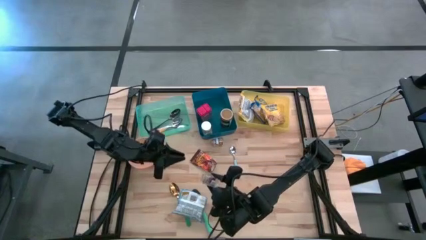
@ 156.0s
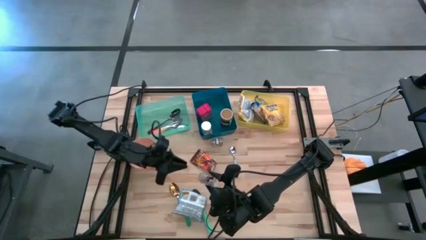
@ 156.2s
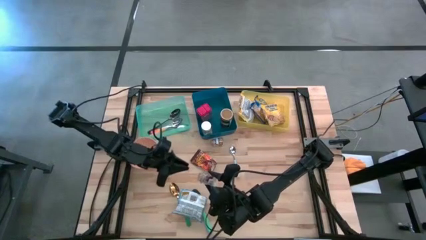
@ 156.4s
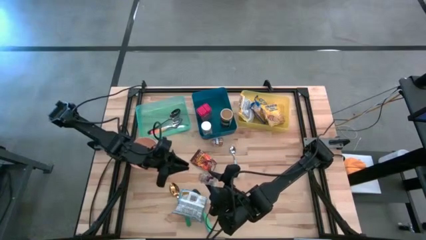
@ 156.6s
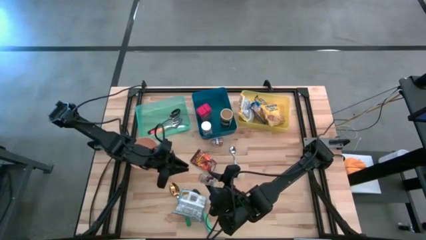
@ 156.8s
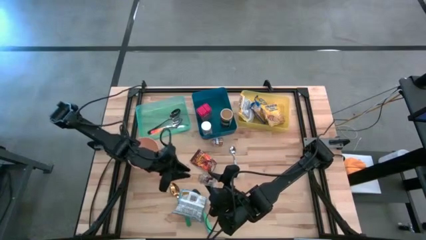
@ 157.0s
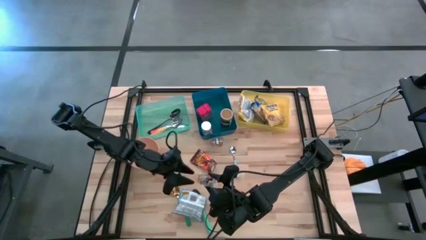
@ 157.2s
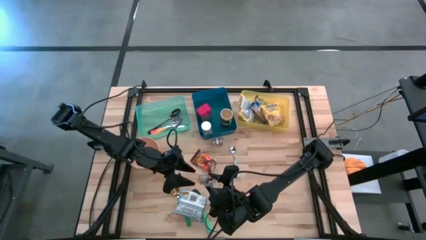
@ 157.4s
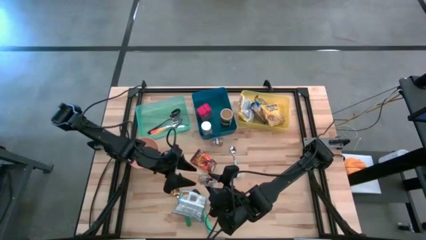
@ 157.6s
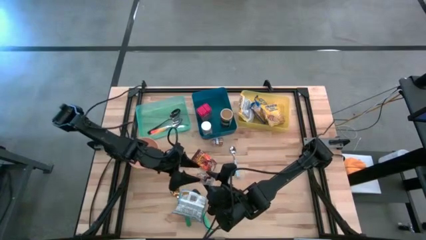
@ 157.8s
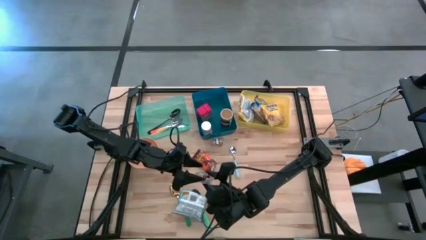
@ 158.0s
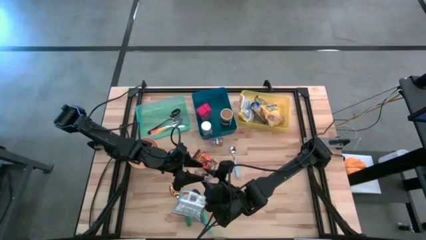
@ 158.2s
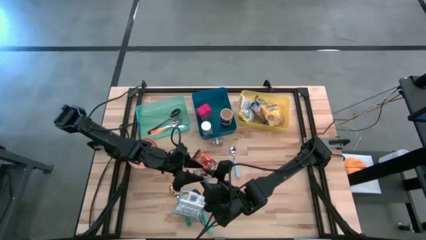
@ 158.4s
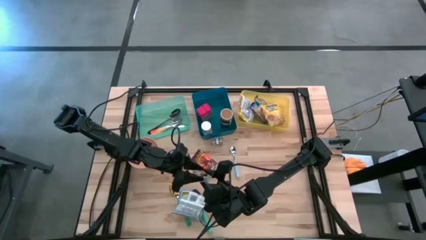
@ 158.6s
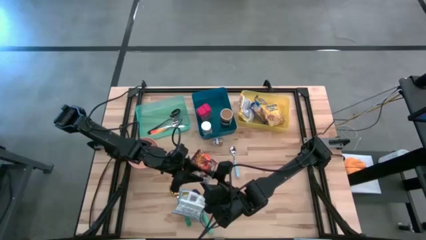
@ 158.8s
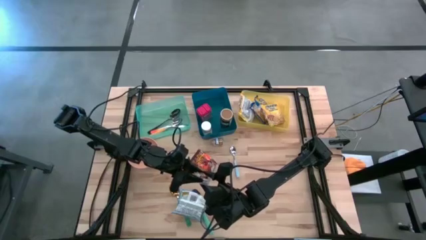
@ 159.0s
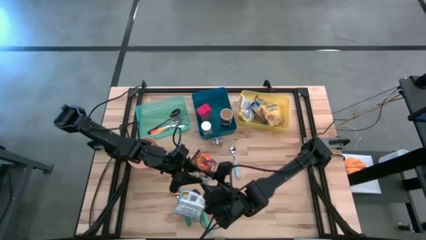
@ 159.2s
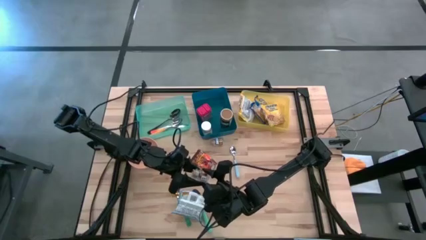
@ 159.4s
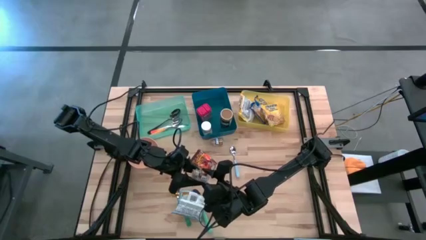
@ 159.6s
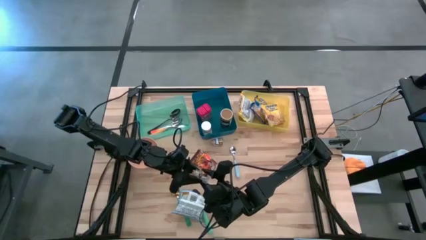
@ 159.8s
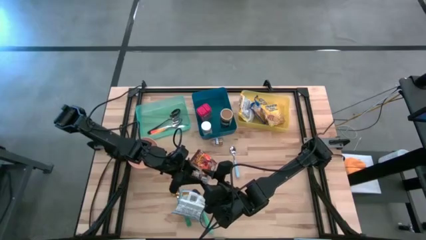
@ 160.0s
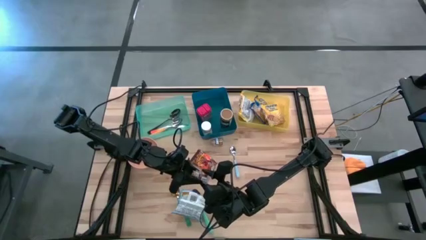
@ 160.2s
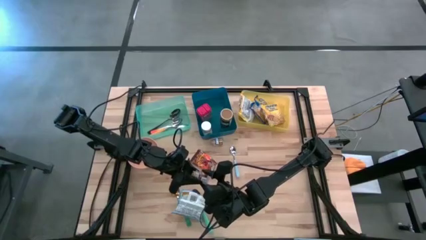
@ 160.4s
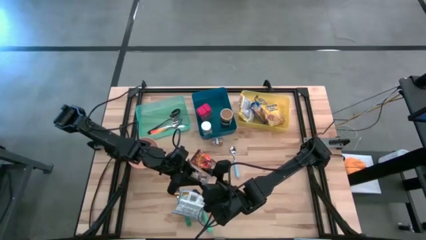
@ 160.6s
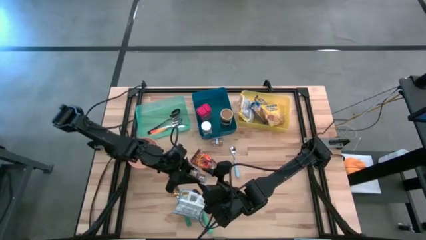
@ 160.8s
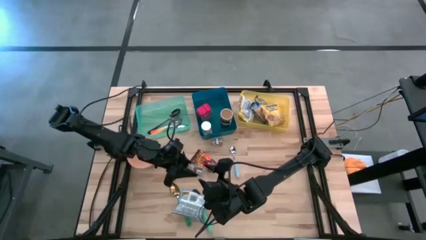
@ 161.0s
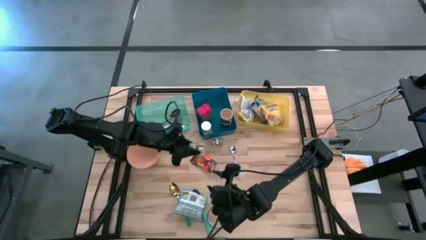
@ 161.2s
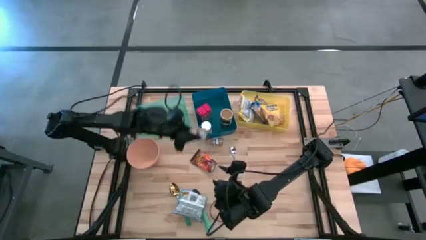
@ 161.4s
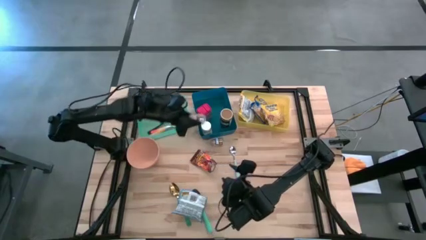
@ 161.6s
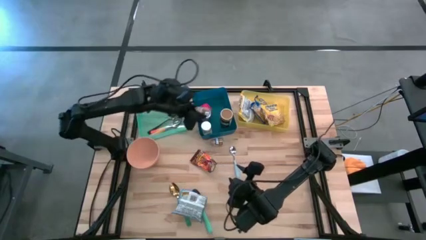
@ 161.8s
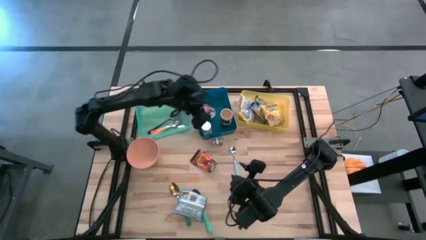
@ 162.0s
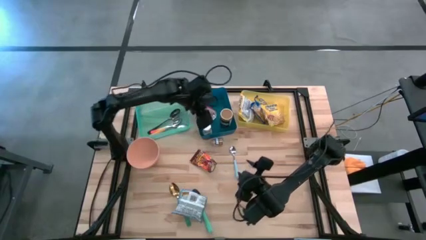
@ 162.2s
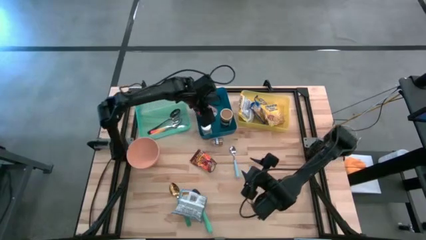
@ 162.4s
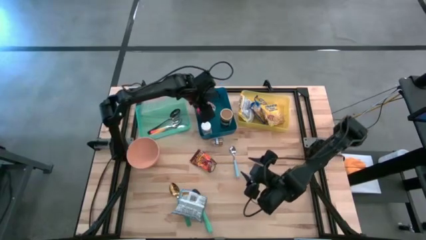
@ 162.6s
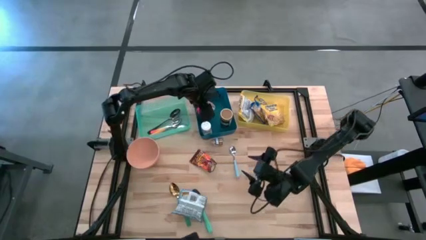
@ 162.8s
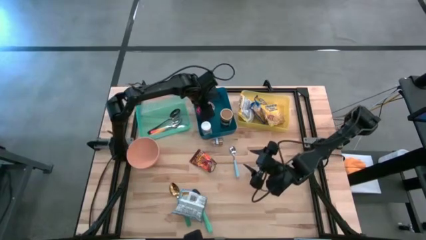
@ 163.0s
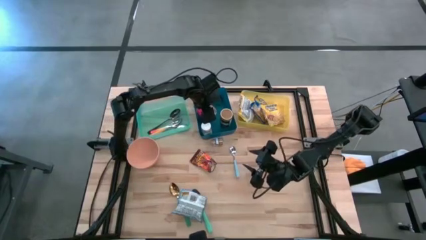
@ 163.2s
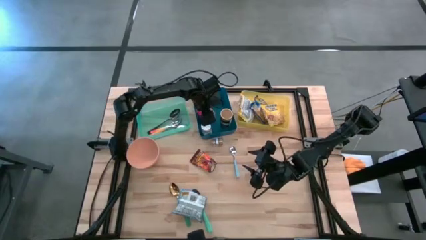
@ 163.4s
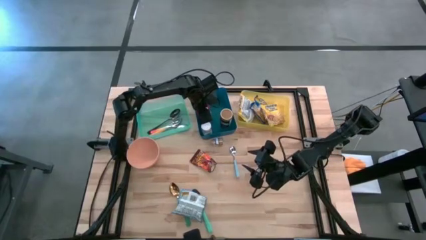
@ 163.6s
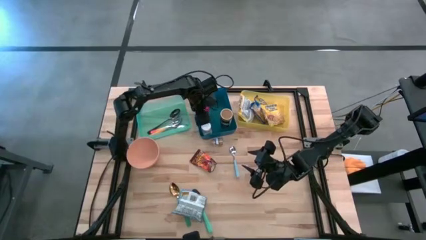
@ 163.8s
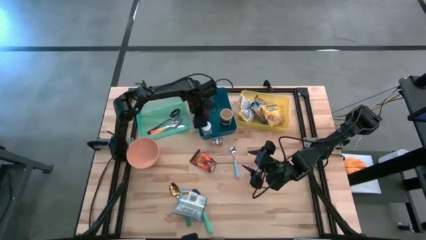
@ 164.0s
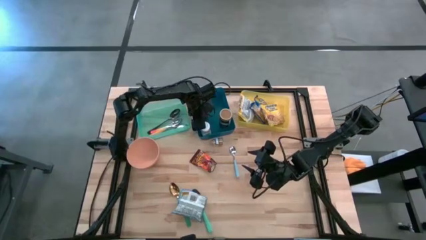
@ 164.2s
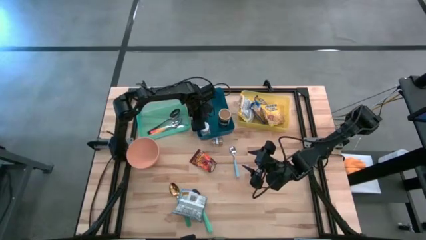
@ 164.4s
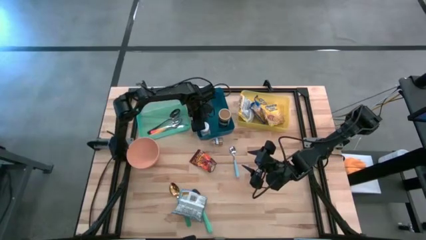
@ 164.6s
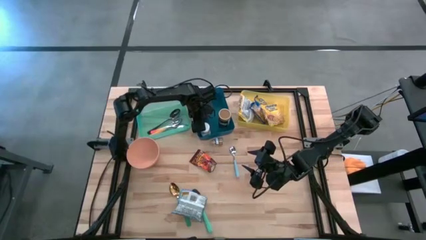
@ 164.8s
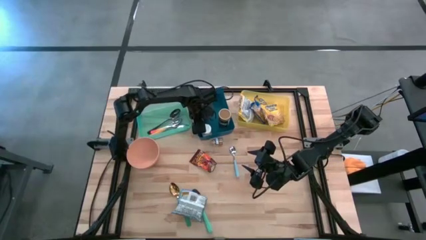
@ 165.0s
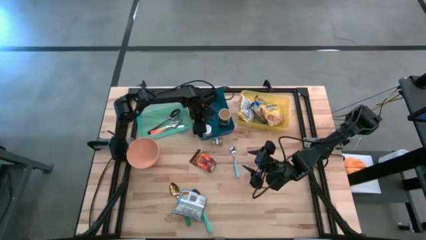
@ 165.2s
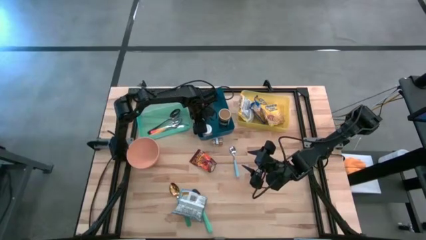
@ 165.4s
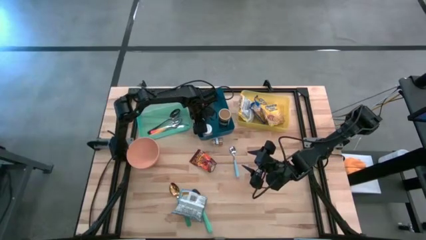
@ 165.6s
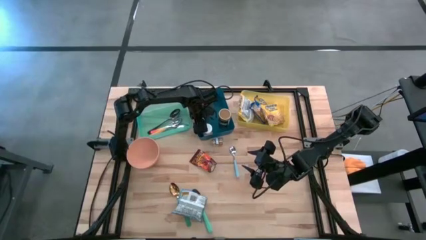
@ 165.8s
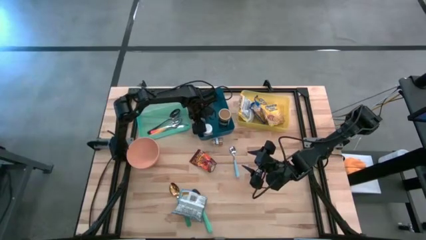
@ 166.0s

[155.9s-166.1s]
Put the bottom brown seasoning bottle into the blue bin
